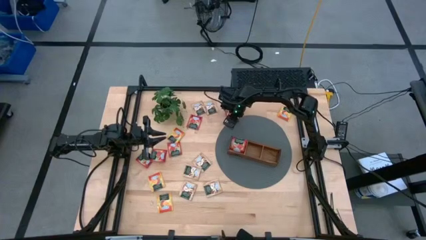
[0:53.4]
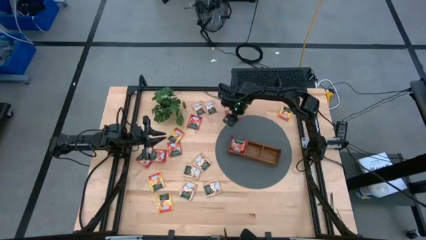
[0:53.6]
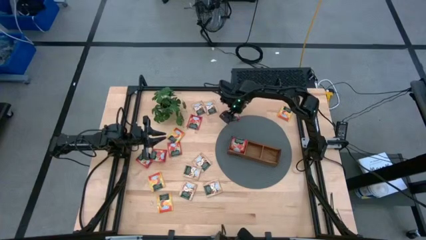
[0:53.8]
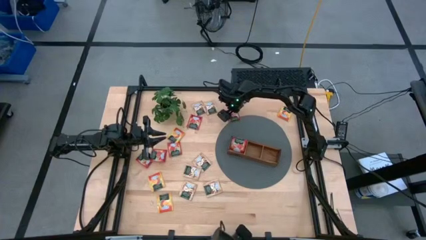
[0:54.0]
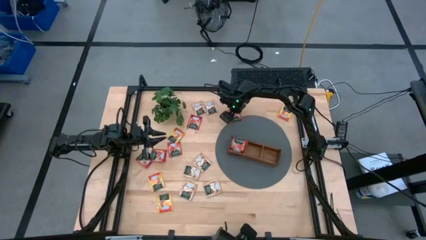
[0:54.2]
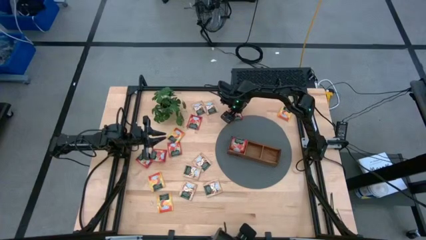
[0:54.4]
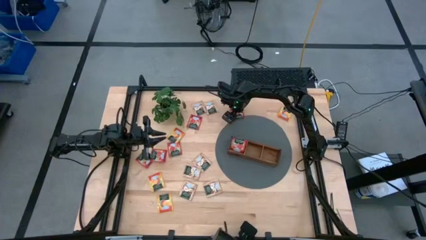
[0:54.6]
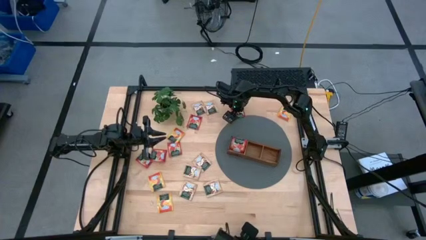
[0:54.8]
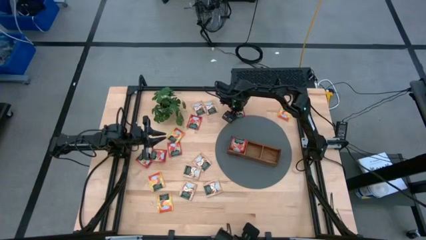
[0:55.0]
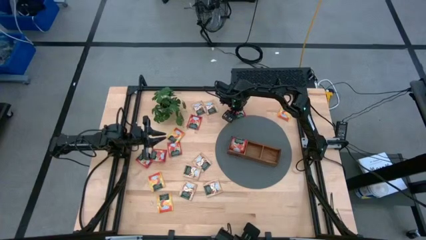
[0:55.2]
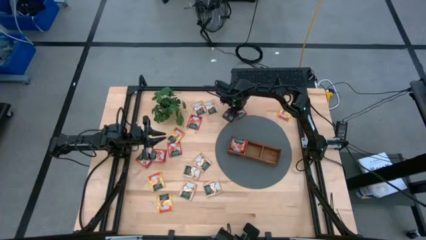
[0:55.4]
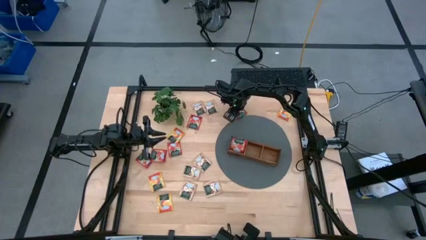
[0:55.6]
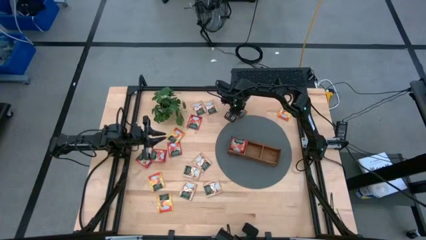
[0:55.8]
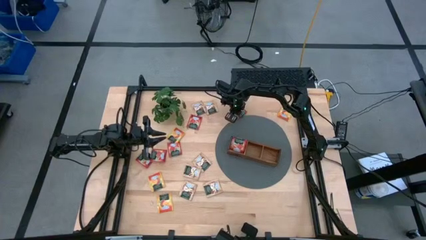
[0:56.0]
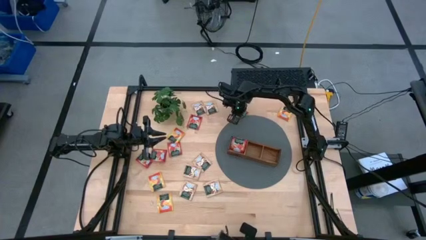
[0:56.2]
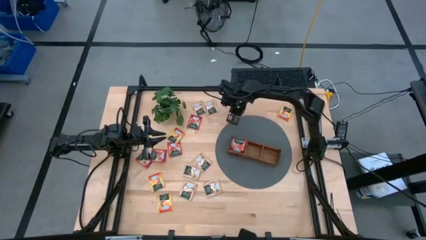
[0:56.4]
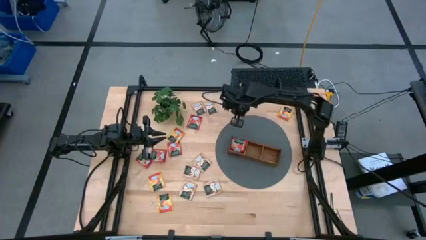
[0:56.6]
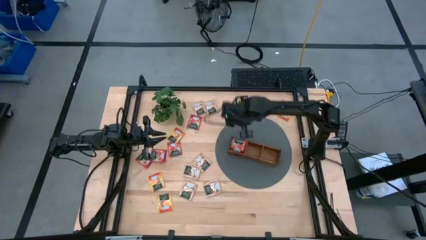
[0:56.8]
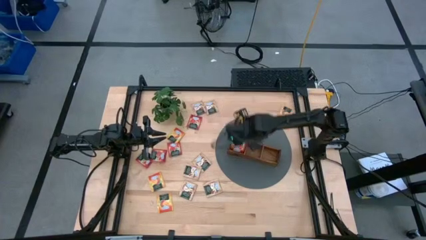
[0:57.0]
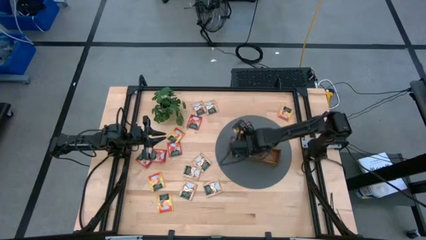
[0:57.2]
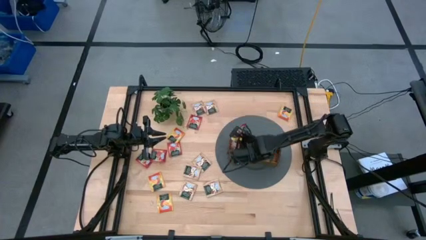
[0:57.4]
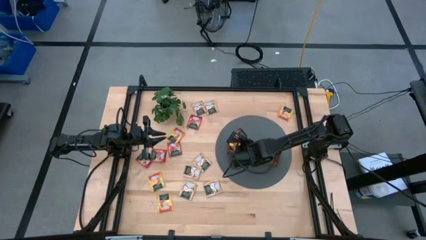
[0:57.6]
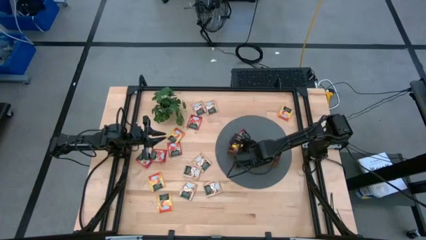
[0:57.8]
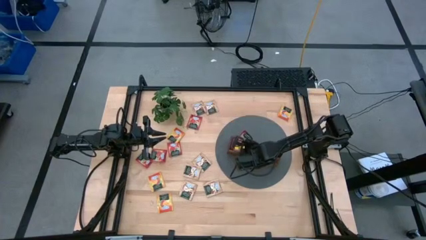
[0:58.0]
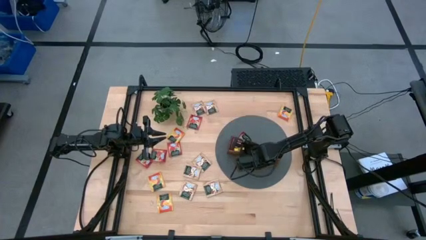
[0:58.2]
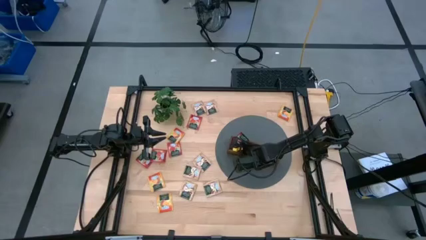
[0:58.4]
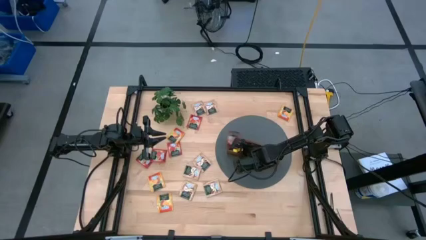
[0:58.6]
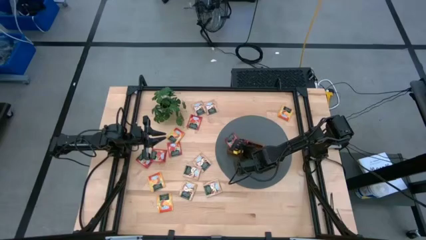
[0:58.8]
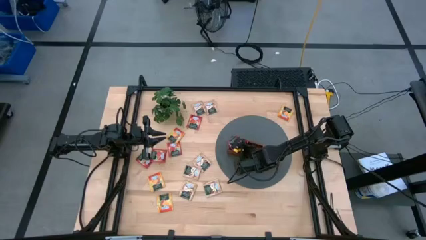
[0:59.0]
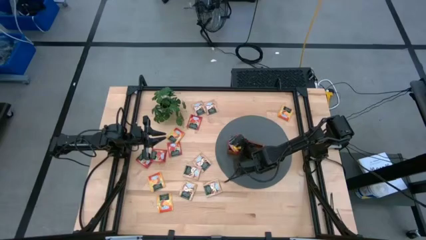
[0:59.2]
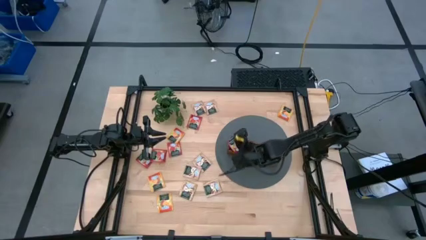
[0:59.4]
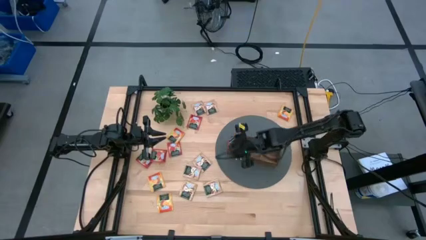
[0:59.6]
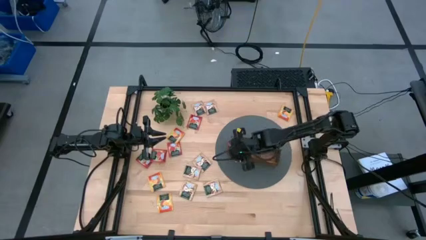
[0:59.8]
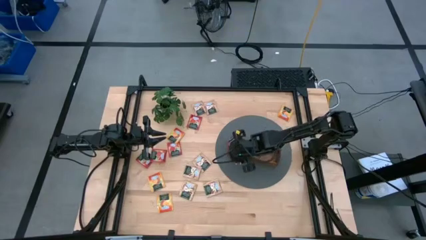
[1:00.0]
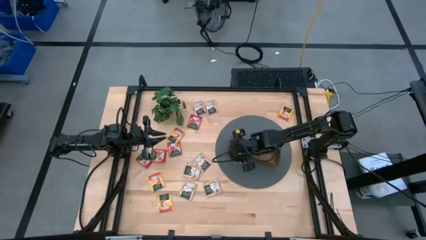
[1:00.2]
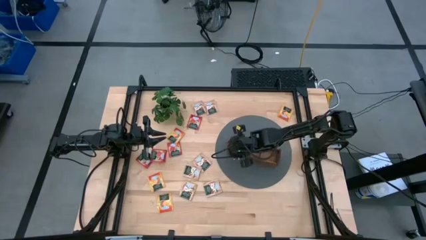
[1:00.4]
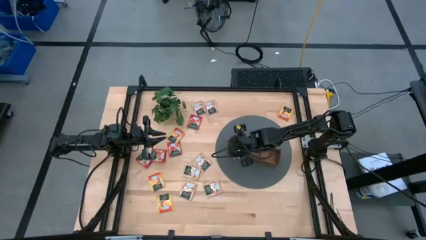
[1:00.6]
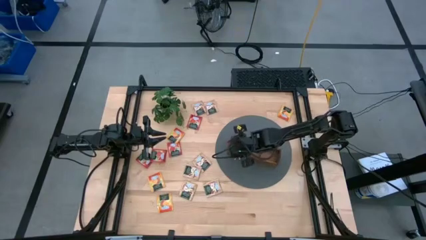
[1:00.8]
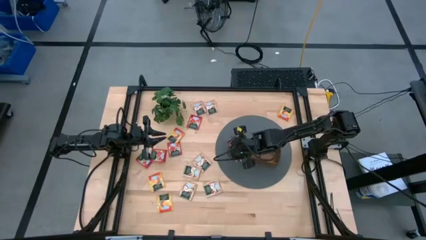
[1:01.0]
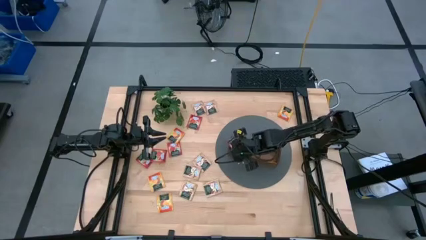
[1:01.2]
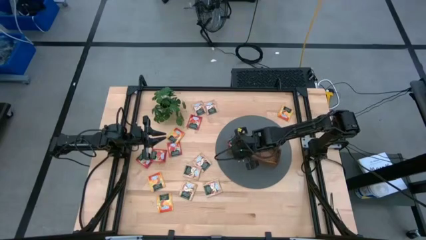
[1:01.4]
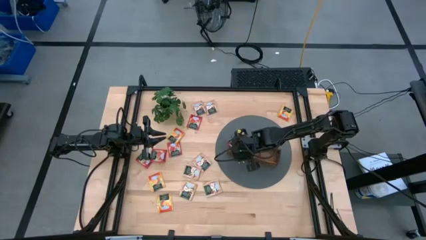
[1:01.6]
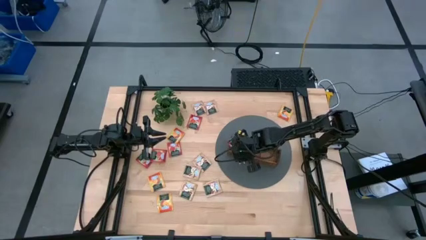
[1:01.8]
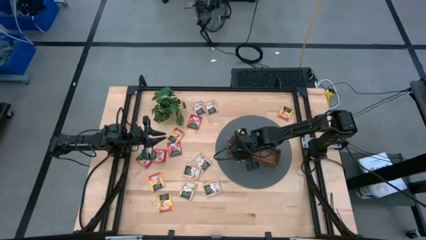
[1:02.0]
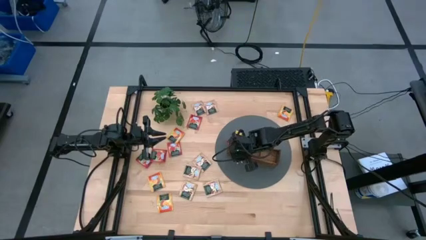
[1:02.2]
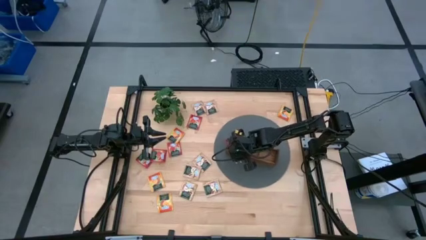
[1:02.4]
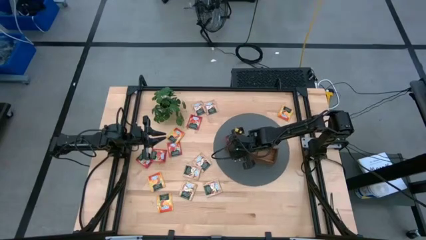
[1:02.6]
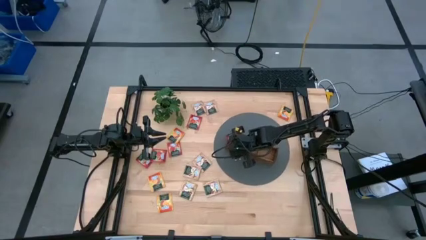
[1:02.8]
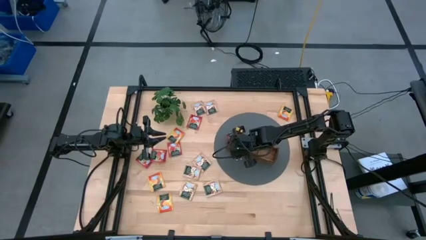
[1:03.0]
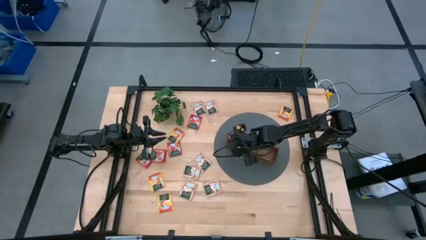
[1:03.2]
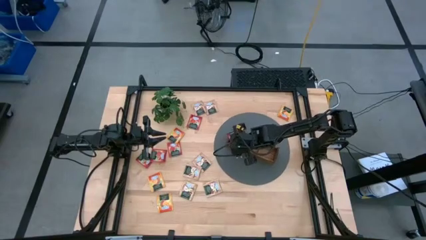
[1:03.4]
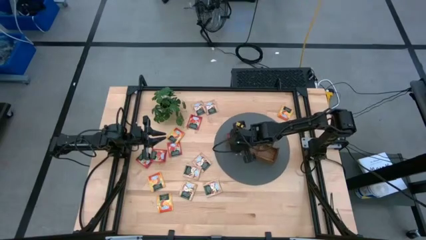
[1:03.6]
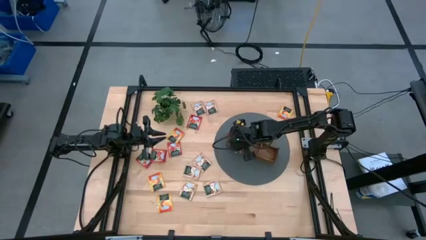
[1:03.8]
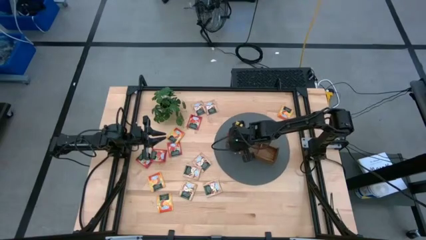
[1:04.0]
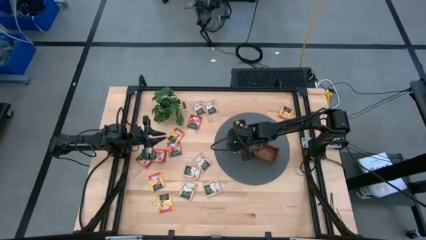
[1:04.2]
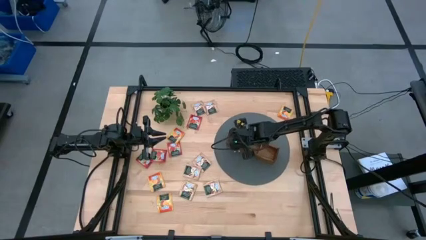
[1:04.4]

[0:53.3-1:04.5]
Task: Pick & Place Tea
Put the red tea bag into the left section of the wooden organizer

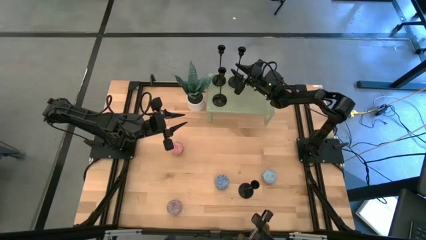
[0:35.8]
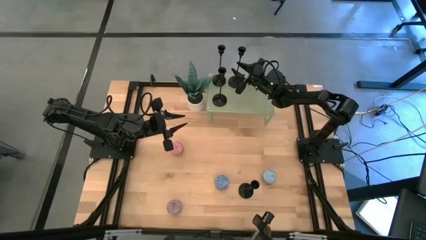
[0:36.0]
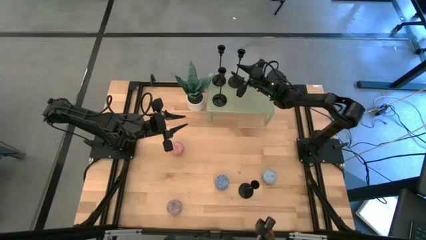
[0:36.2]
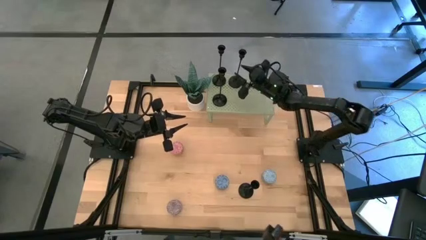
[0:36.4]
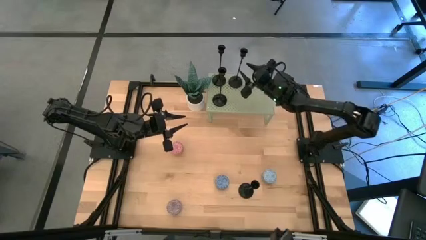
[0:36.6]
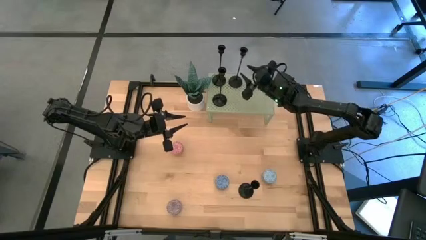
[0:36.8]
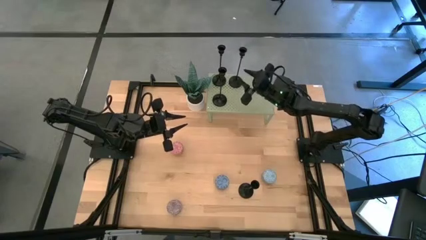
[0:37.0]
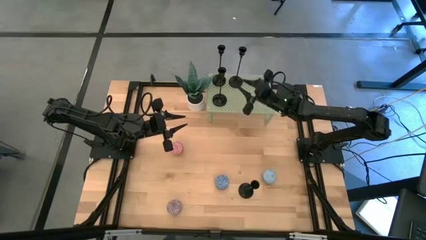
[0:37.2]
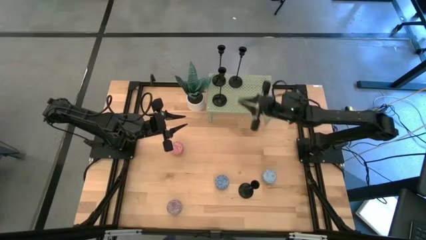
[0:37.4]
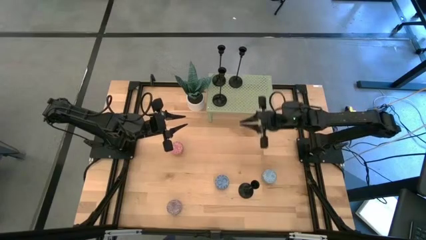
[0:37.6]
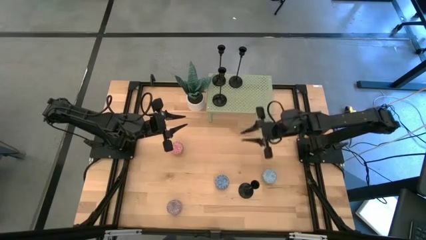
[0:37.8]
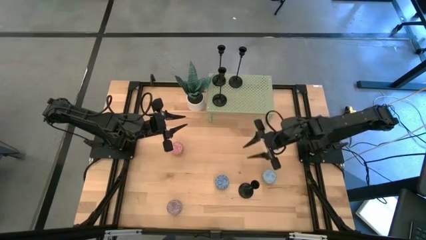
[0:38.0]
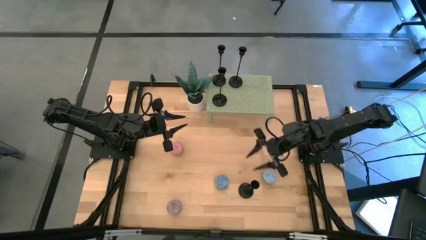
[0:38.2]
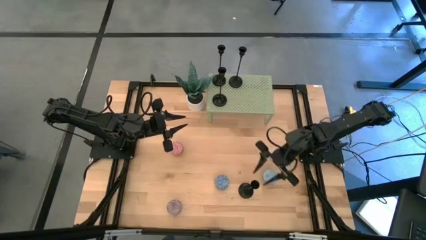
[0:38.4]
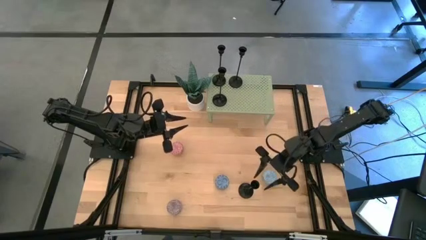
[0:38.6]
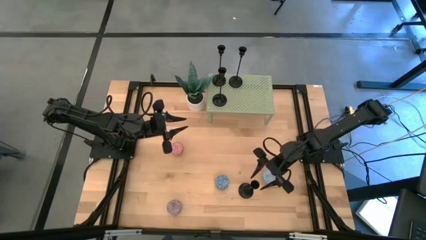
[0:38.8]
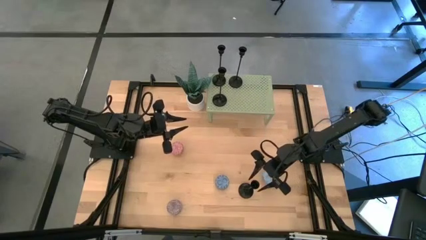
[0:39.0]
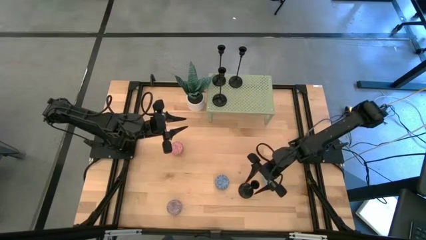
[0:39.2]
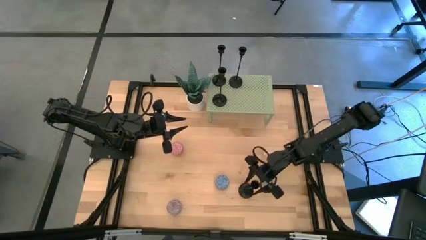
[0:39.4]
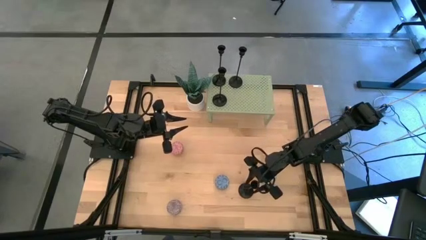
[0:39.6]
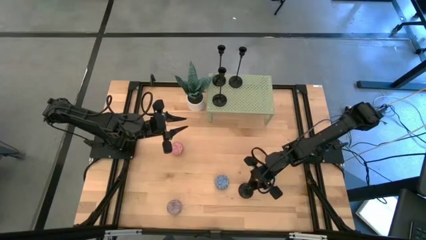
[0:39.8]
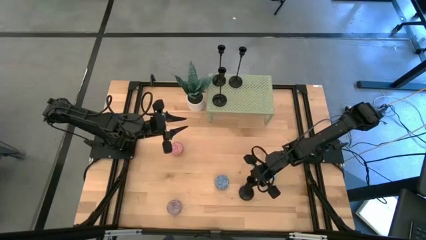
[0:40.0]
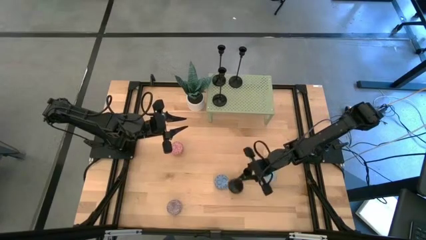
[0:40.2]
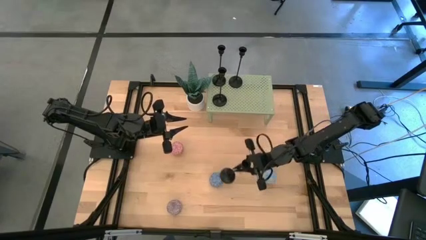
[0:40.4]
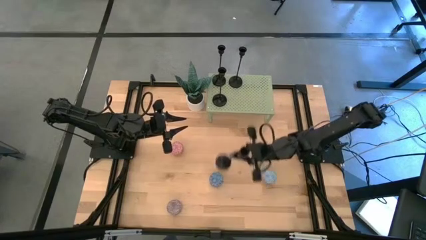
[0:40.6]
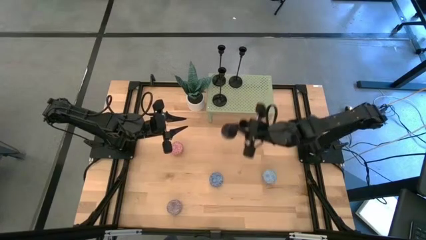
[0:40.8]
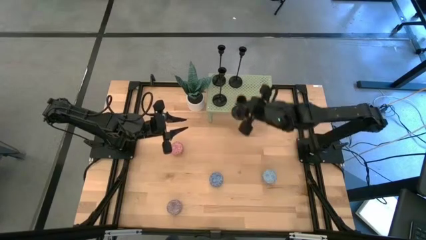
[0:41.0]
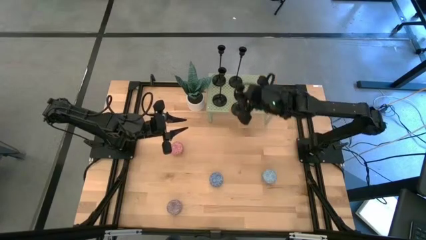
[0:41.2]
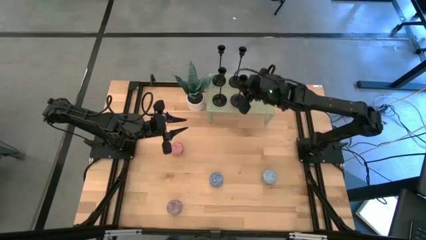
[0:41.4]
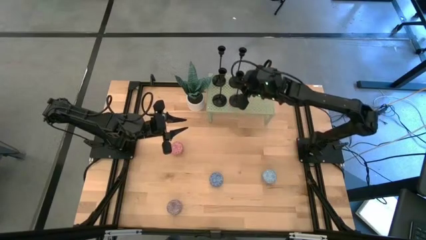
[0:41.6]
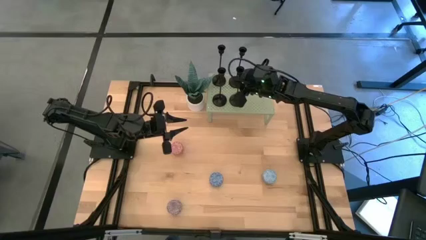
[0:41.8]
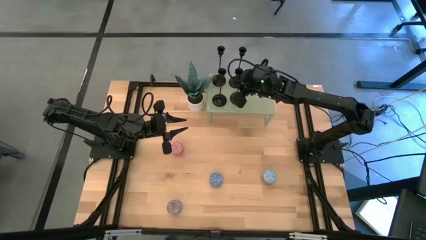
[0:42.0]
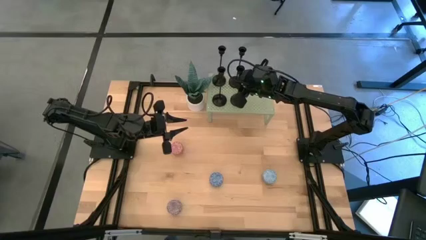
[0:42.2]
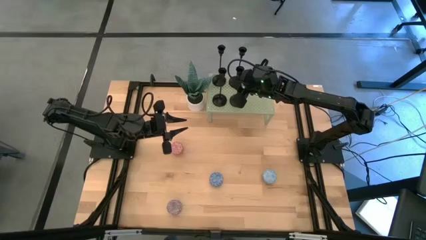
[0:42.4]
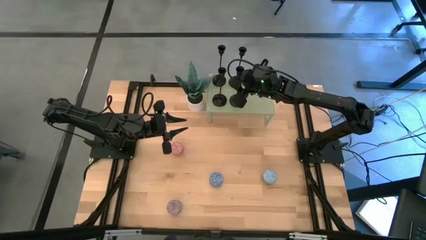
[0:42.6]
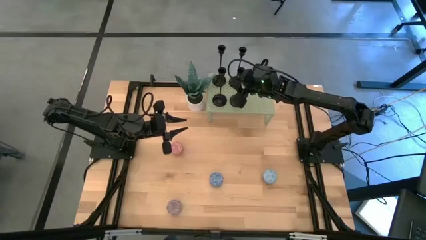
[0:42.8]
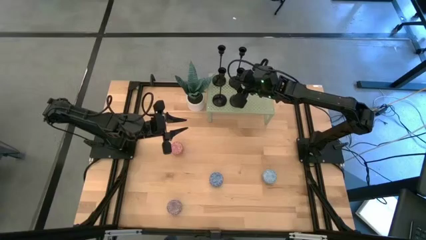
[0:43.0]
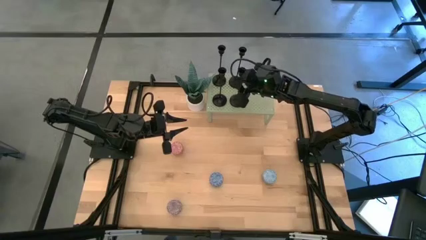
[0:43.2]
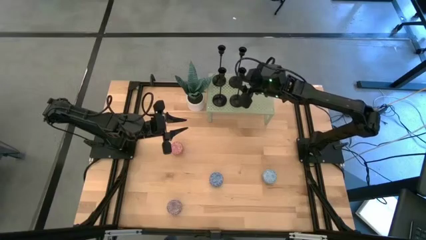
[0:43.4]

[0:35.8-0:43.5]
Task: Pick & Place candle stick holders
Align the black candle holder with the other black candle holder on the shelf
